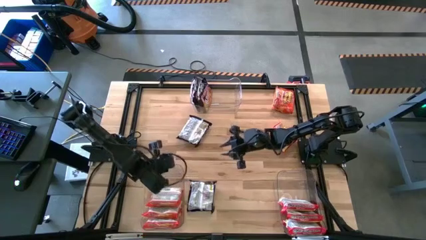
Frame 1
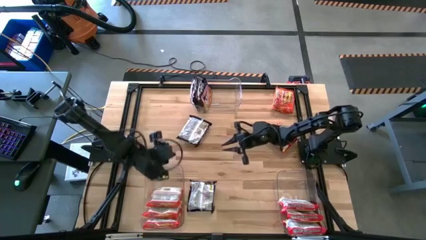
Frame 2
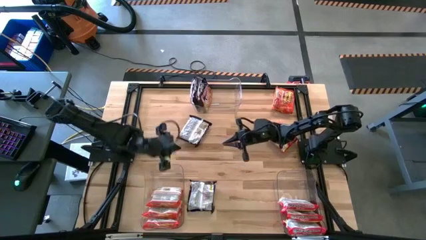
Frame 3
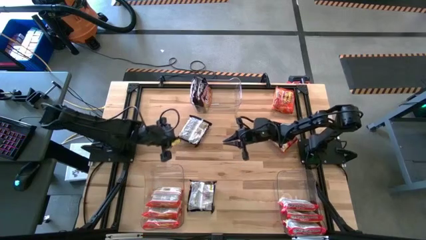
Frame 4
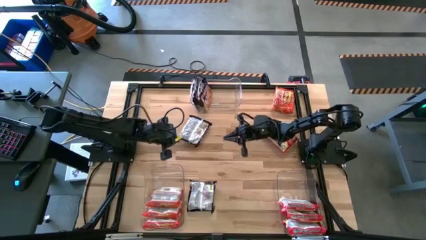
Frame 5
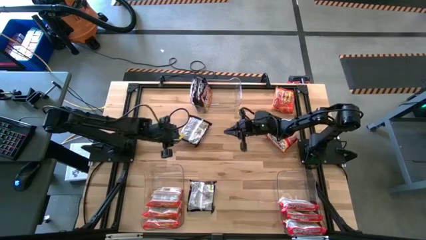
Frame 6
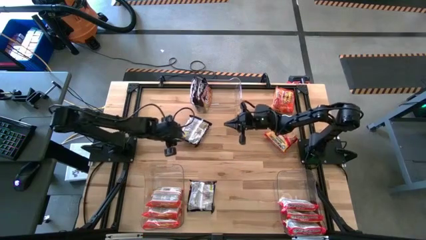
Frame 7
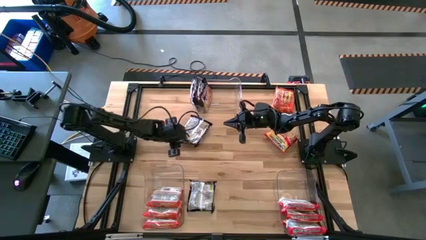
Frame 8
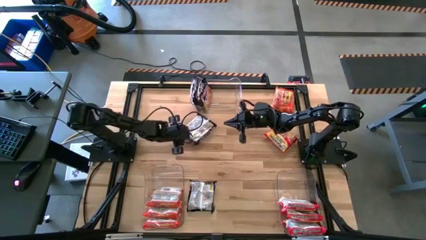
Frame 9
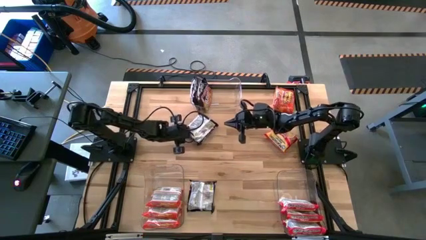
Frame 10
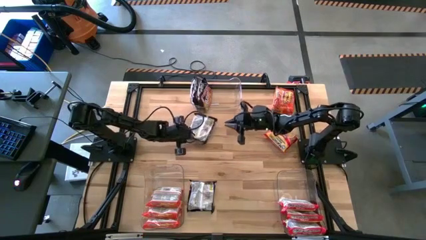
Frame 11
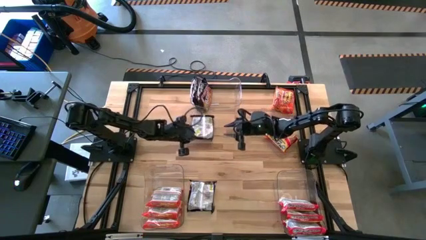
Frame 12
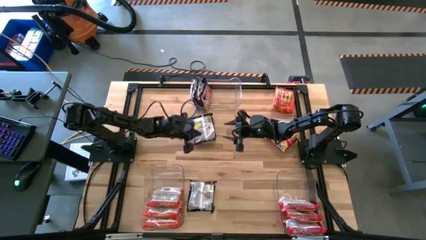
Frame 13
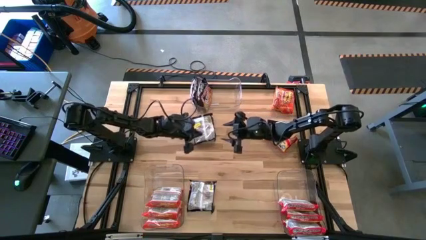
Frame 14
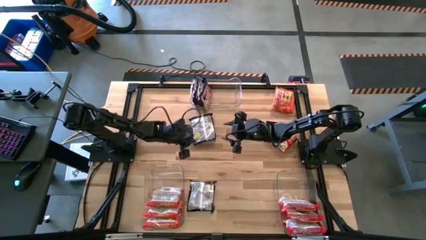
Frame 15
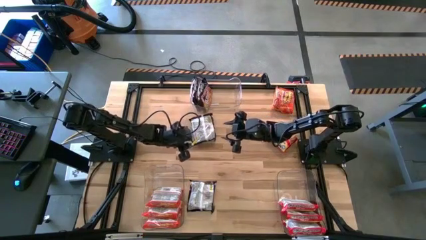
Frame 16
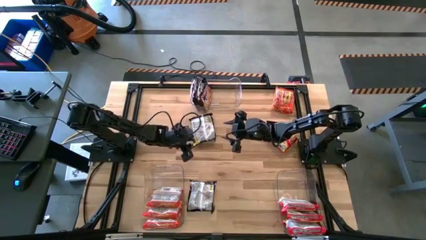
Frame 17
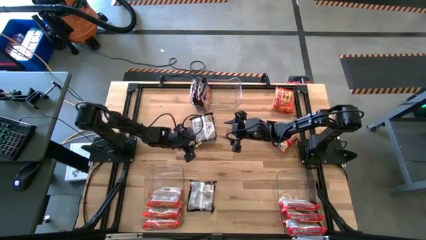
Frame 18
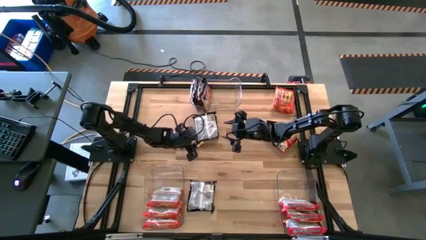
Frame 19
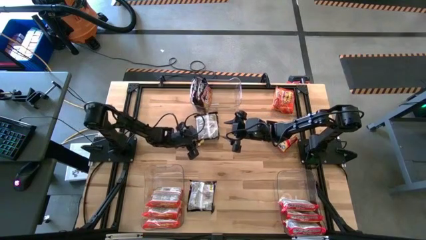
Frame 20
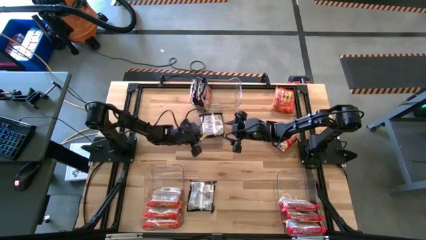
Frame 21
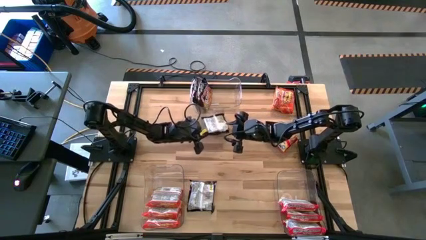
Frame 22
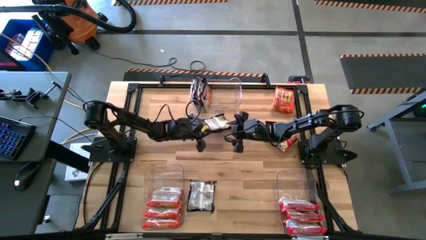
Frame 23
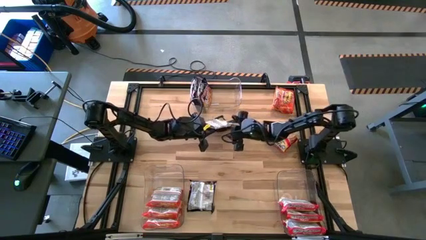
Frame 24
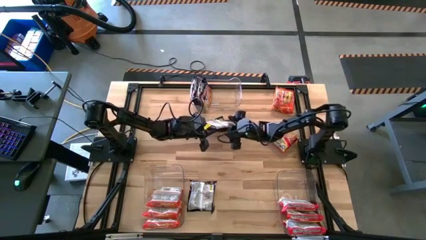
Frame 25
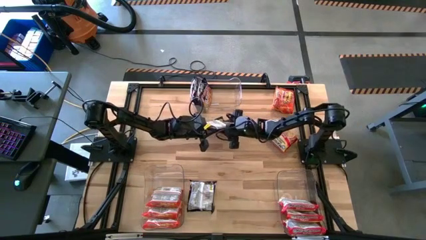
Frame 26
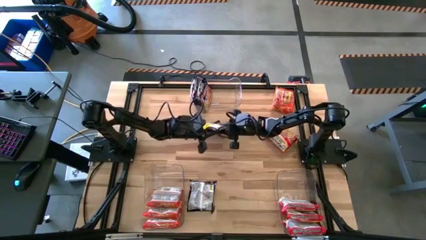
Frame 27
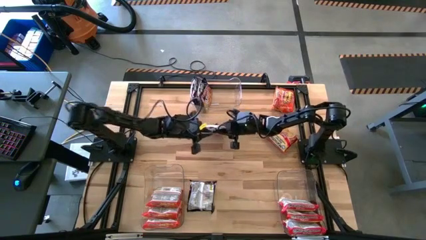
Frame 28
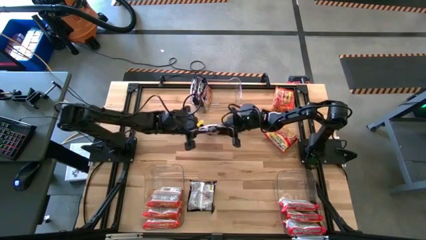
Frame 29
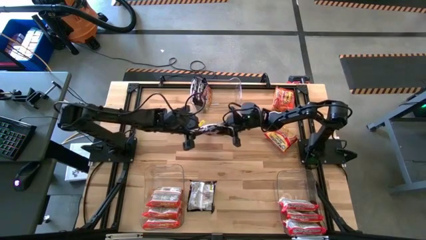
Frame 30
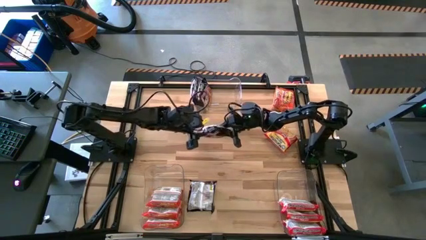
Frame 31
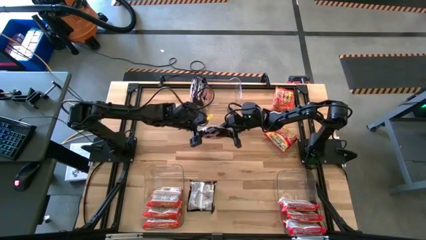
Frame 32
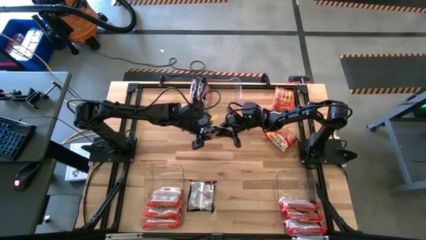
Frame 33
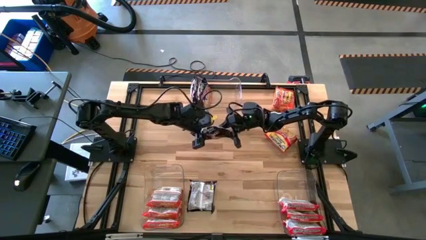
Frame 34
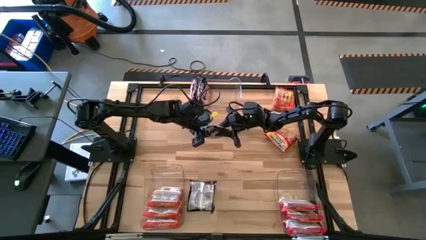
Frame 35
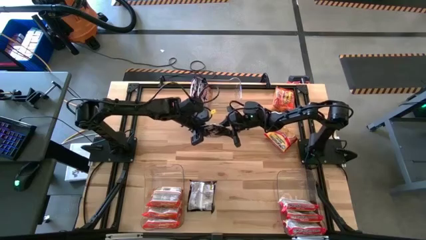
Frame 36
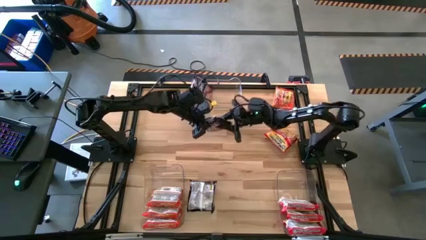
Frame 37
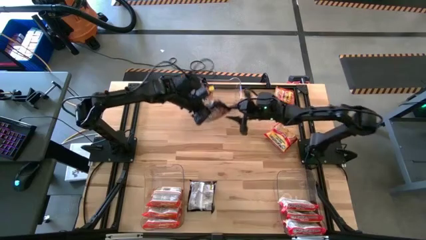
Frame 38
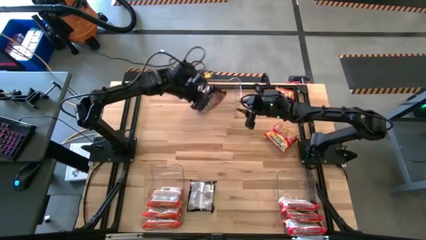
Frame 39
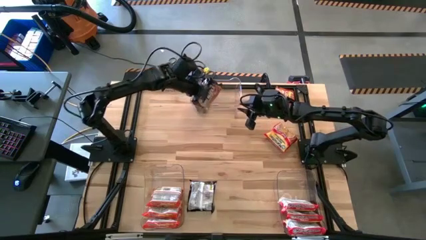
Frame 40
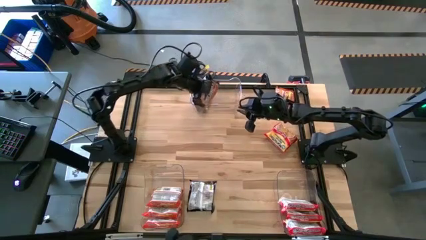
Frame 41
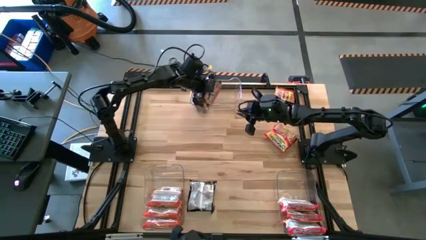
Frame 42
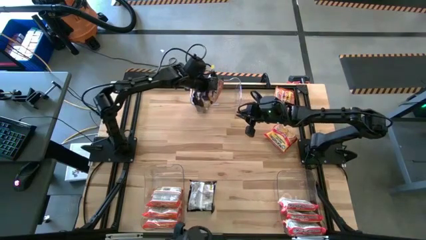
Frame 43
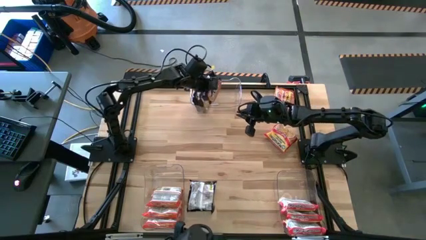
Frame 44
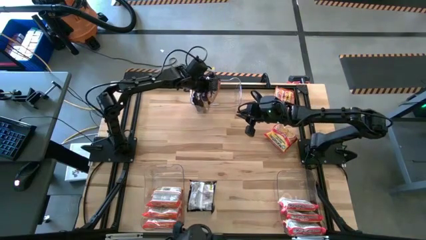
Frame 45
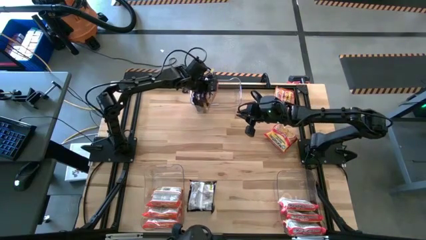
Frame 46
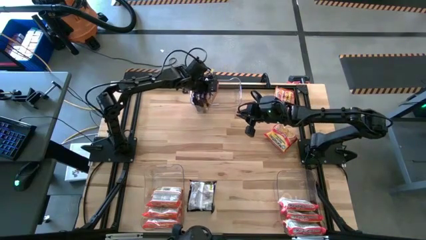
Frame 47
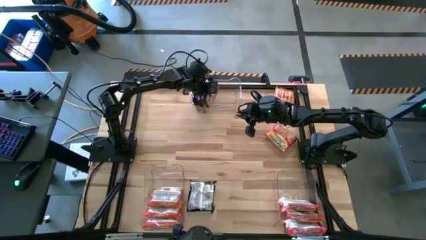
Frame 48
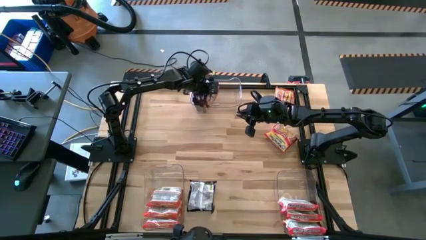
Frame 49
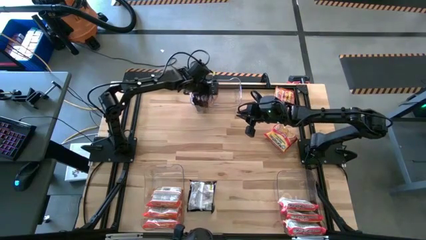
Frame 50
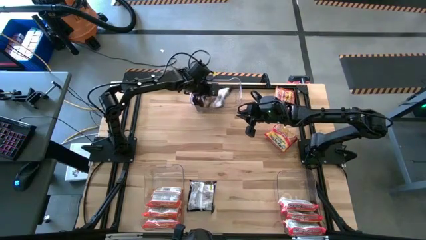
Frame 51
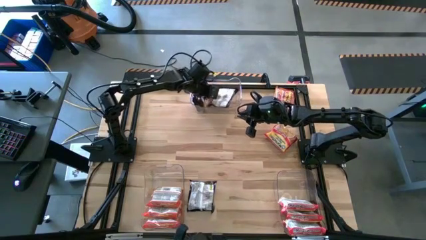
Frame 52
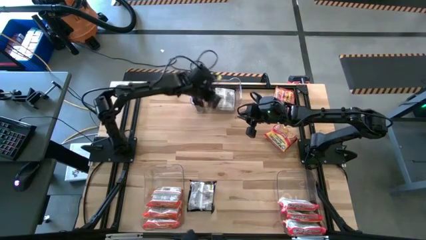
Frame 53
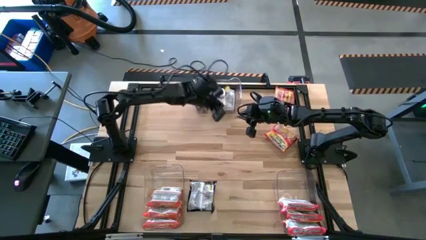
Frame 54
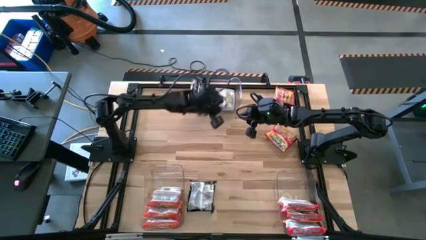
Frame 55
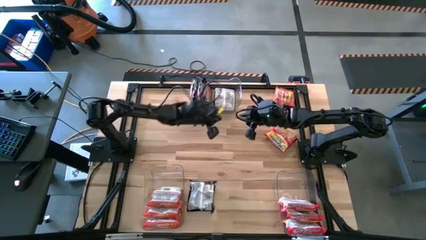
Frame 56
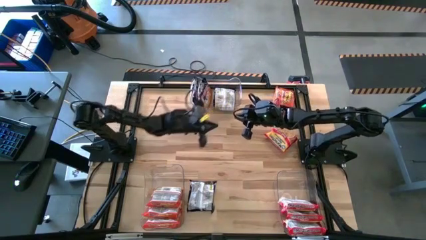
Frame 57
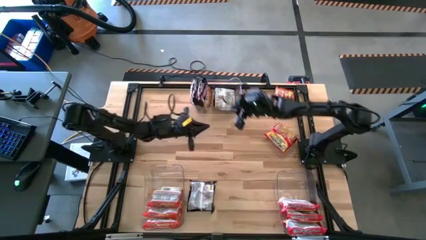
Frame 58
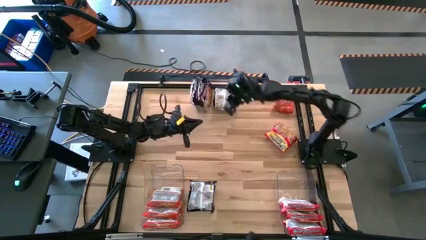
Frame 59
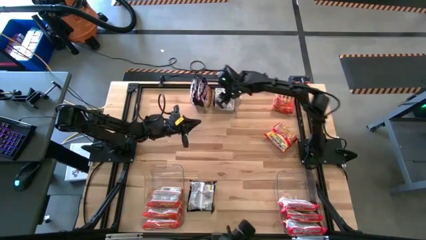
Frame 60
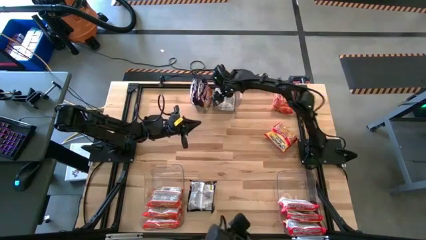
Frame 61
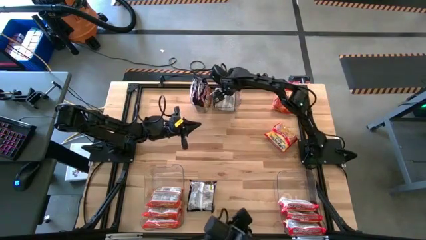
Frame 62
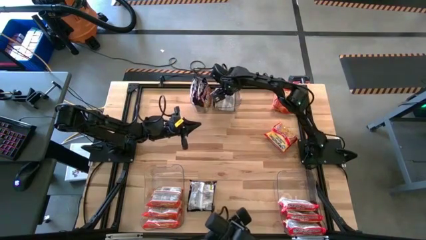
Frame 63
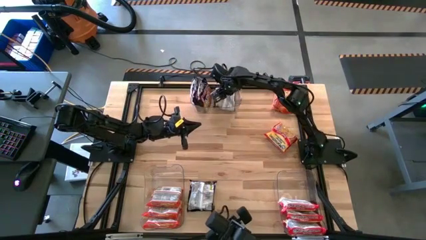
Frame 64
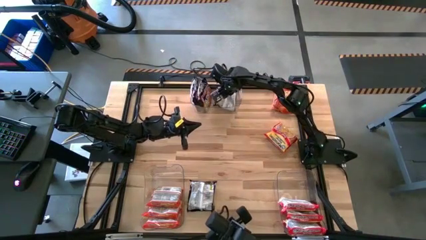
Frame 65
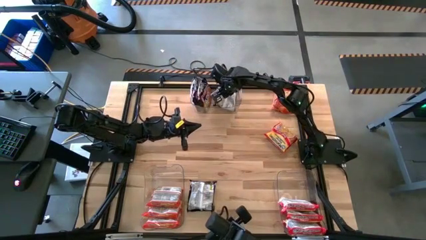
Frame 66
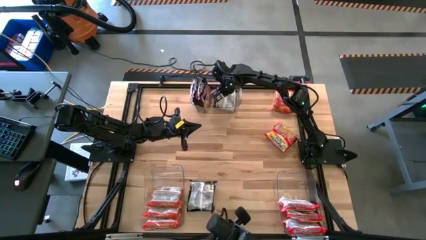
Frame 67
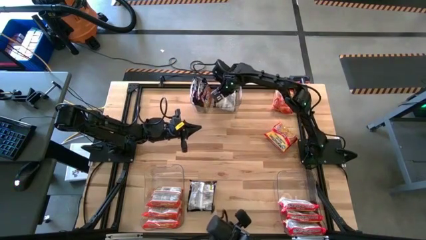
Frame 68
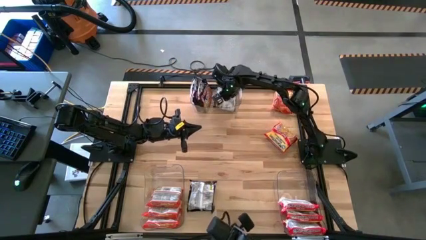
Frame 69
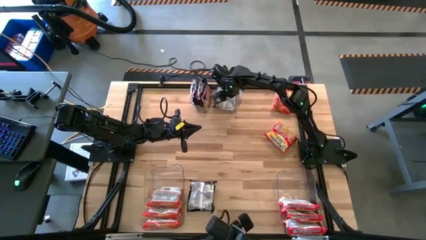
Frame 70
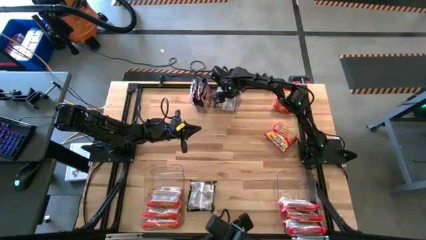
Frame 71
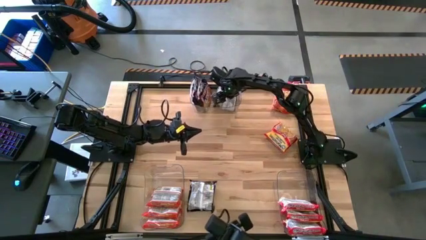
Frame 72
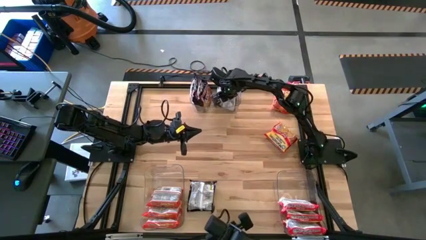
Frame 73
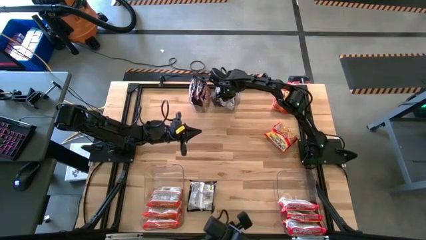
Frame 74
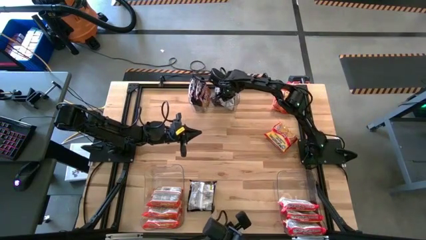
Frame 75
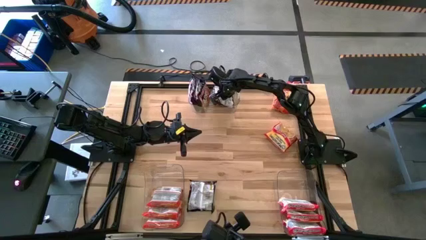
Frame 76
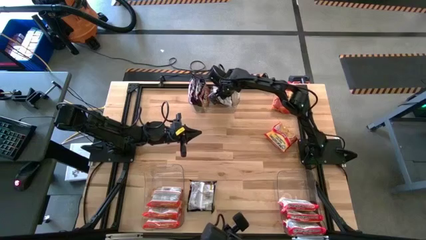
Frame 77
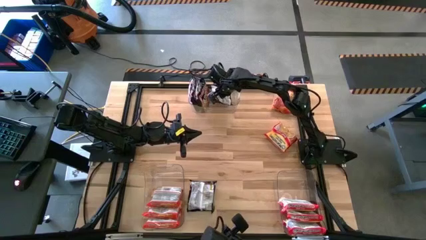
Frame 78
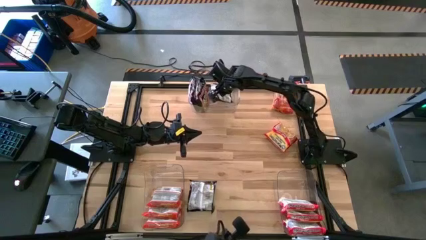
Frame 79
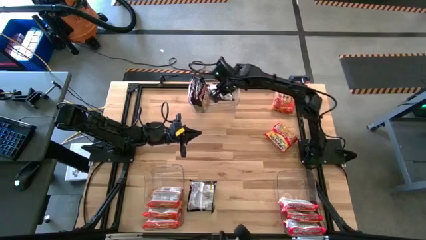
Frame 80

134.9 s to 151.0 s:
Task: Sort Maruchan noodles
Put the top black noodle pack into the top transparent bin
